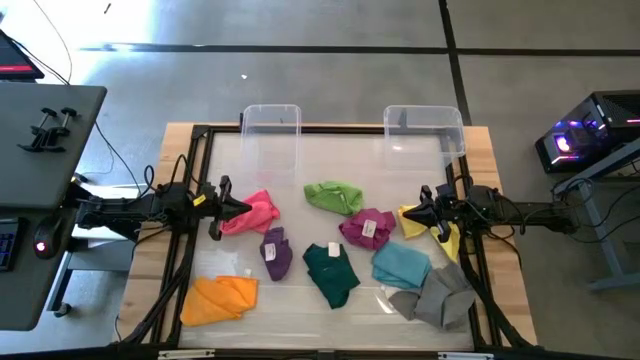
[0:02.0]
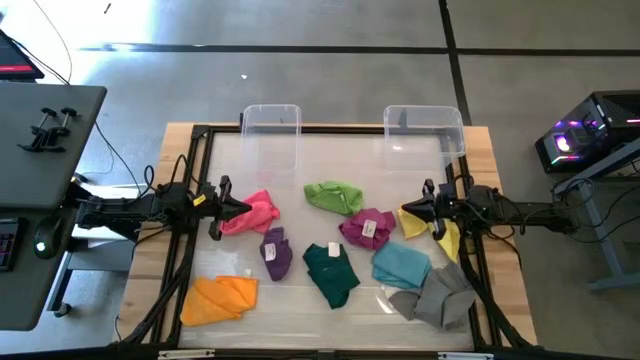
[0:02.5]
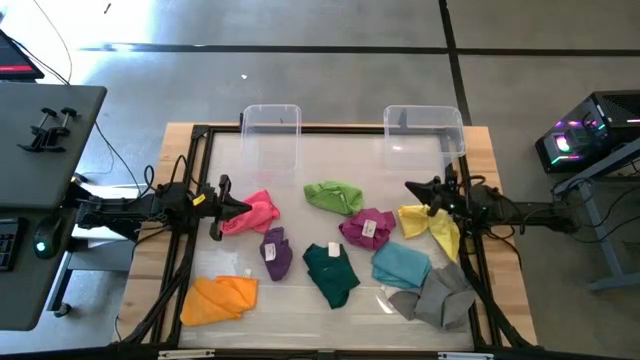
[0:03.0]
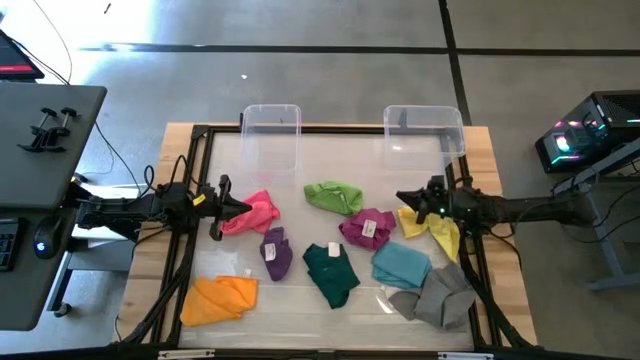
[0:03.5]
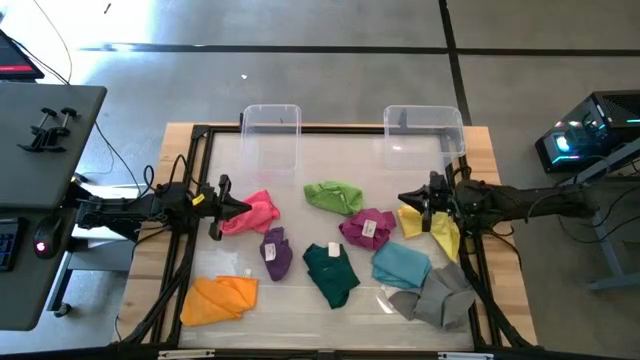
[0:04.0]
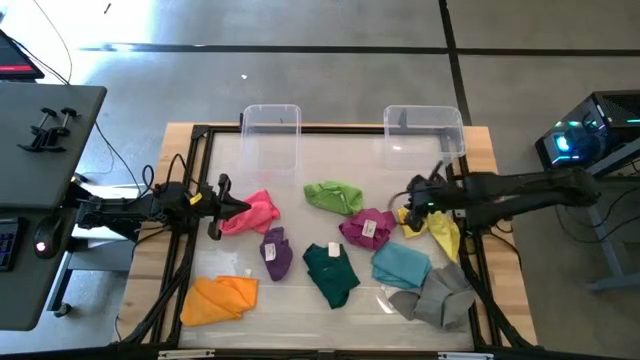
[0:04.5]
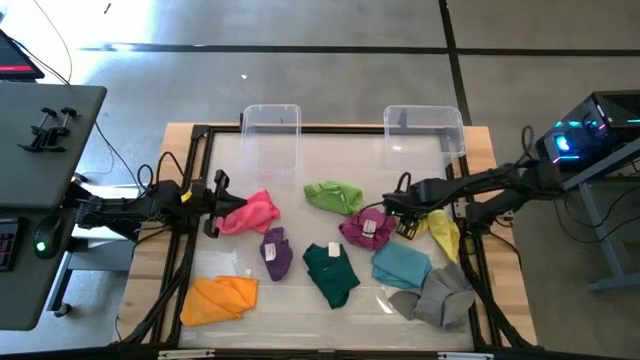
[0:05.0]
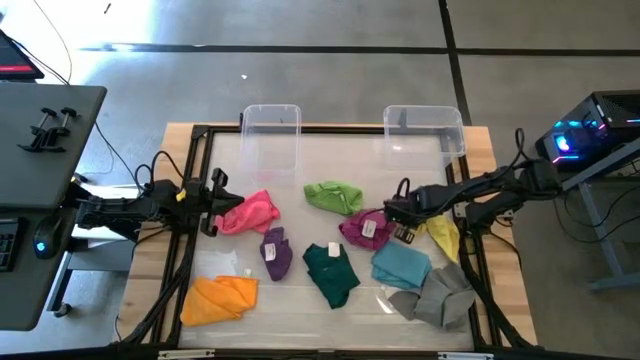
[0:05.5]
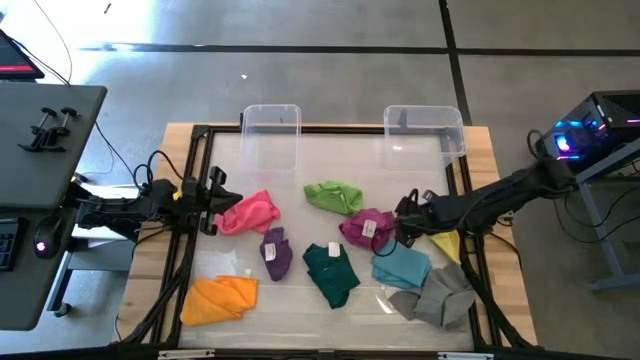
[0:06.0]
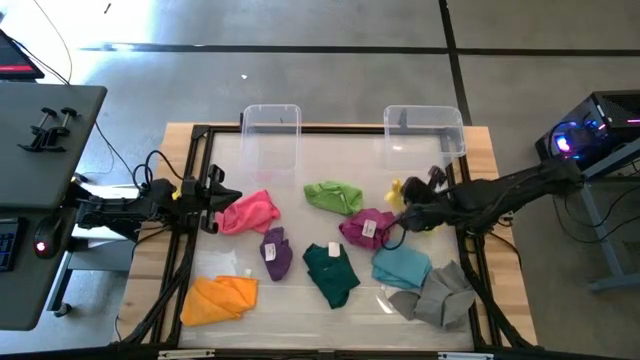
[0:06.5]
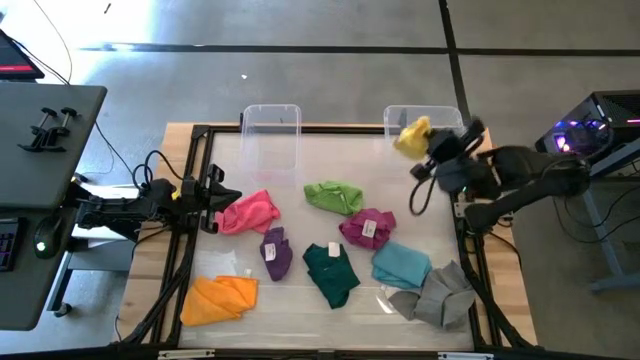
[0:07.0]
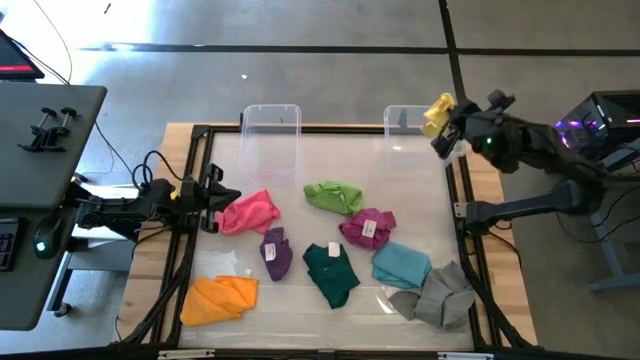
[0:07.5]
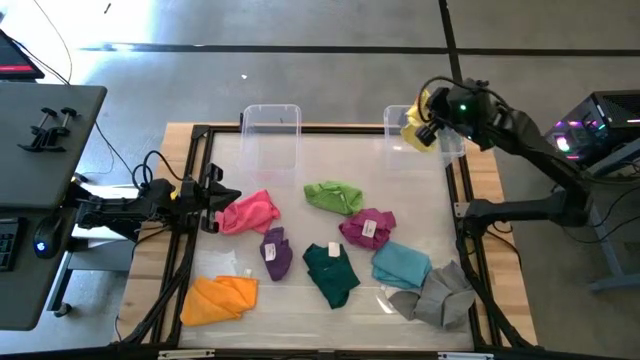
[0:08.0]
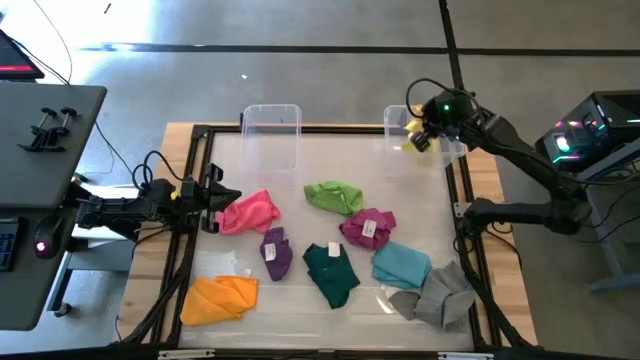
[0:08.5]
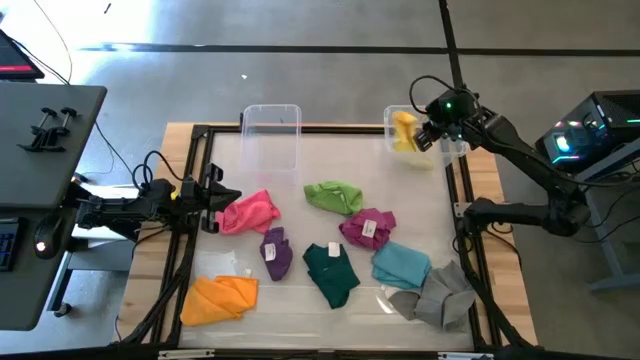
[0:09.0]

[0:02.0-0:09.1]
Task: Sort towels by color in basket
Put the yellow towel into the right transparent bin

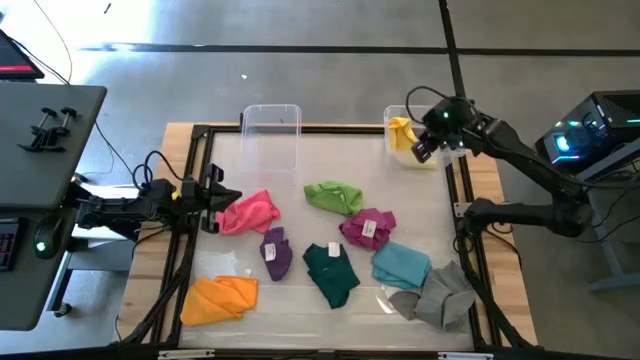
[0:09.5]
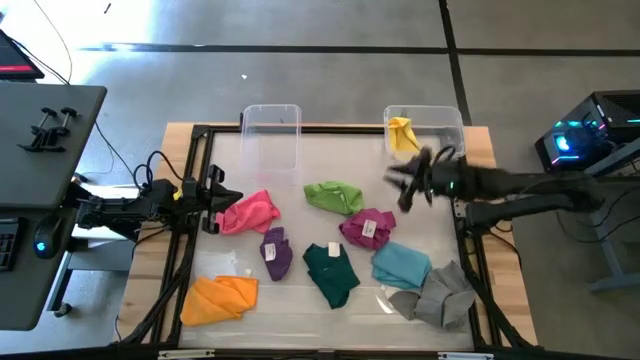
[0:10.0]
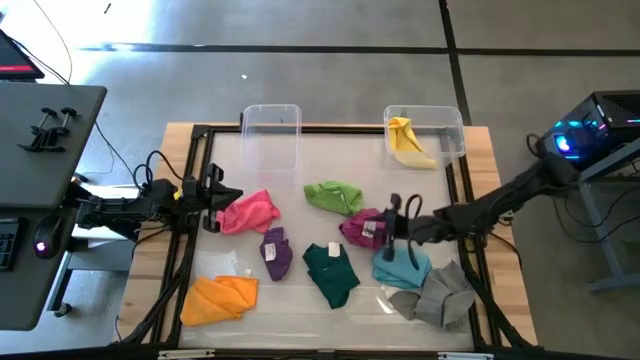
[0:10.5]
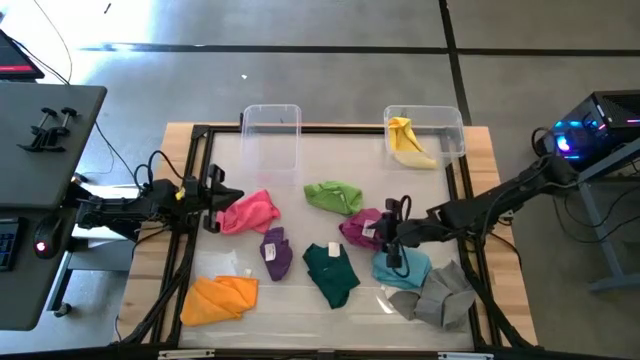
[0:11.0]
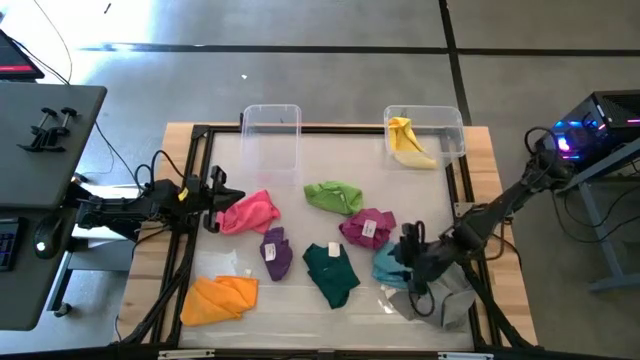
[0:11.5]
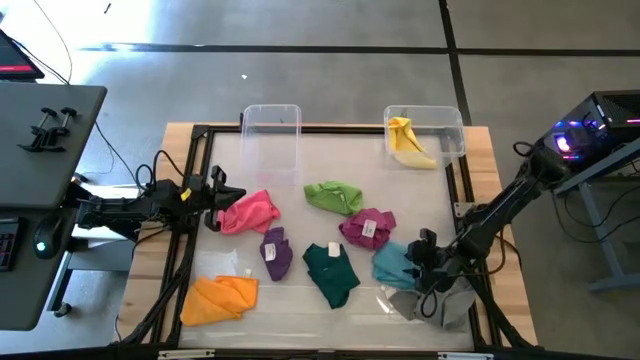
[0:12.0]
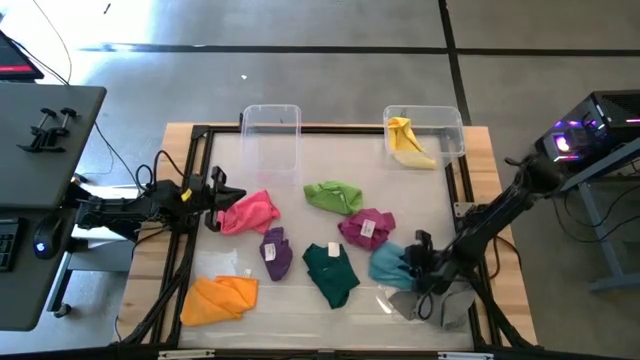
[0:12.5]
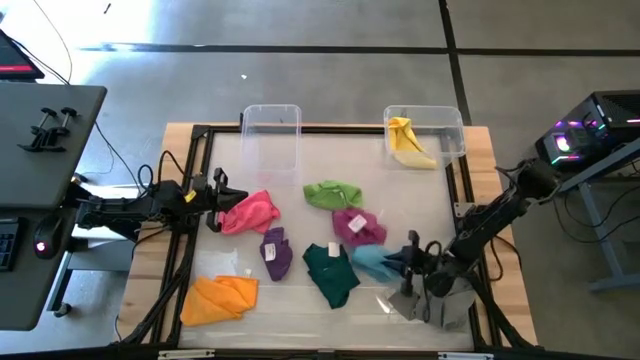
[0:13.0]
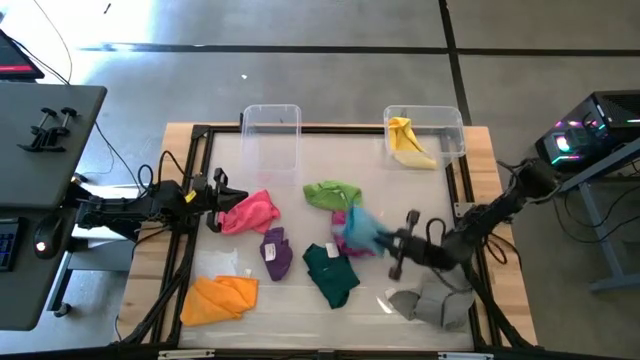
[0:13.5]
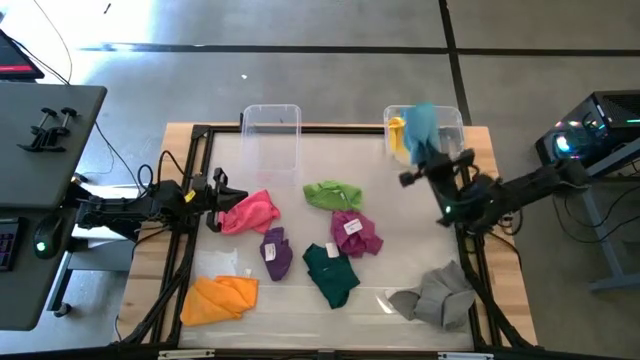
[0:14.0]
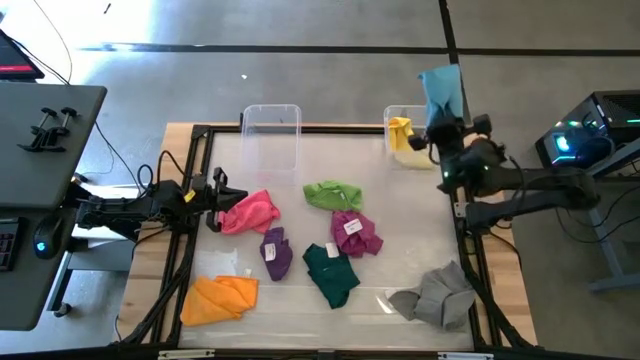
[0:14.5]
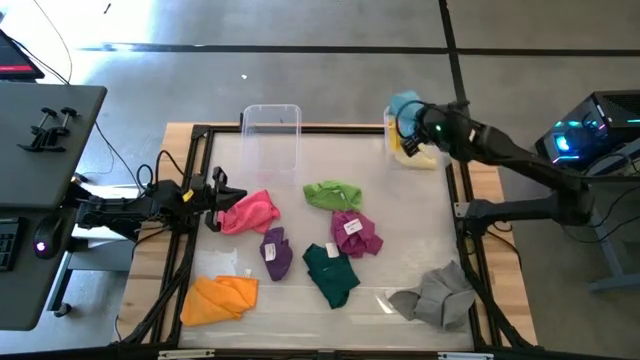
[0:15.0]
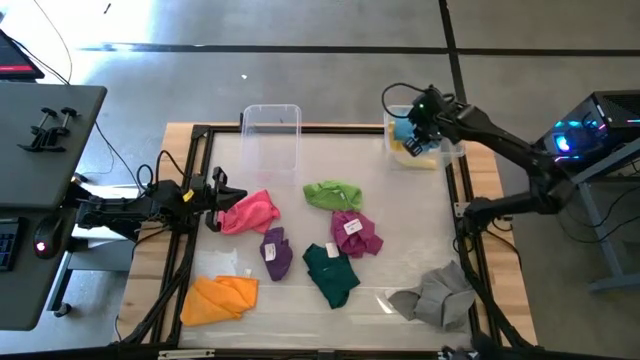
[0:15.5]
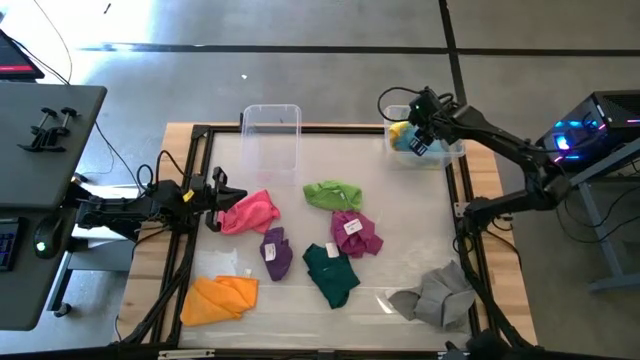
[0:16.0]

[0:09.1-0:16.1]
Put the blue towel into the right transparent bin

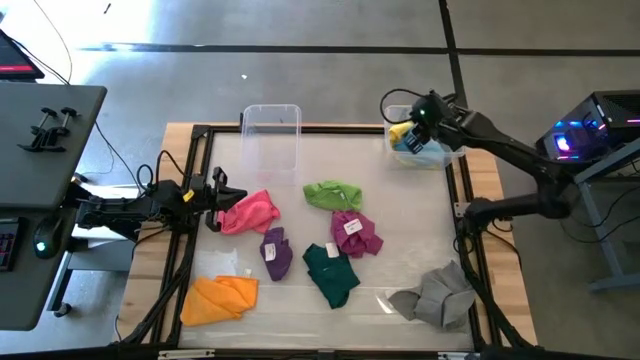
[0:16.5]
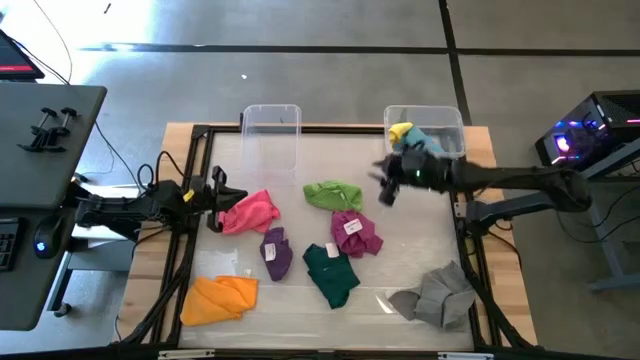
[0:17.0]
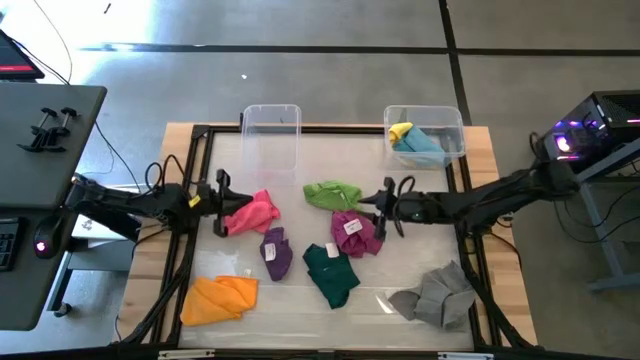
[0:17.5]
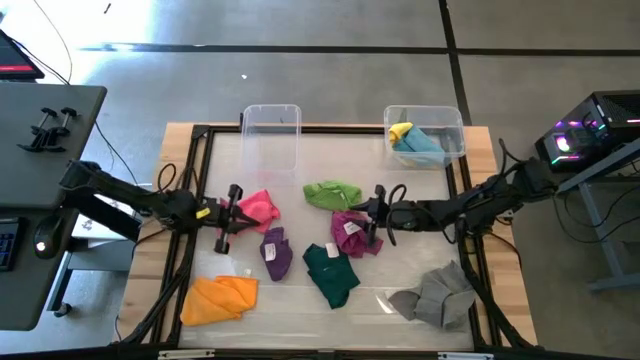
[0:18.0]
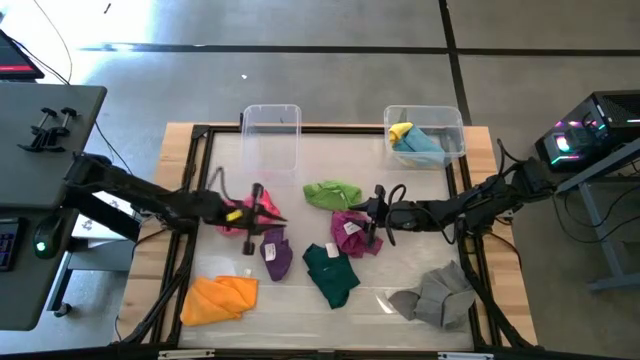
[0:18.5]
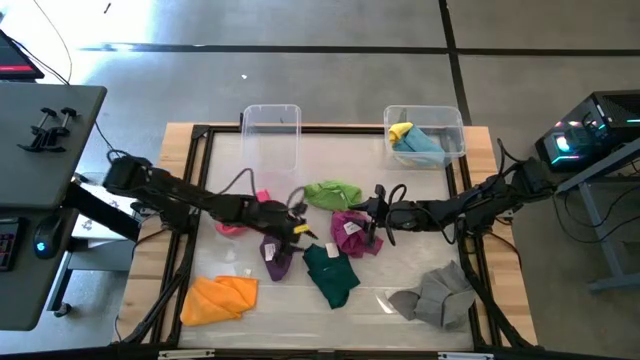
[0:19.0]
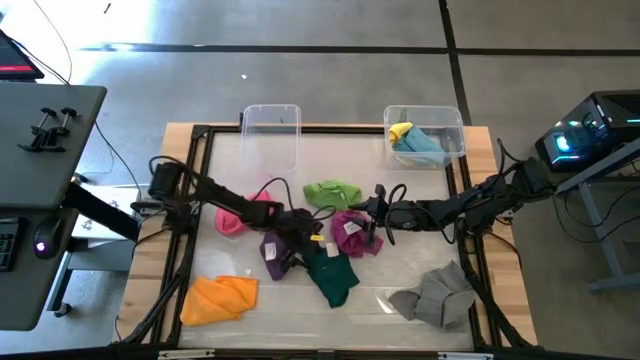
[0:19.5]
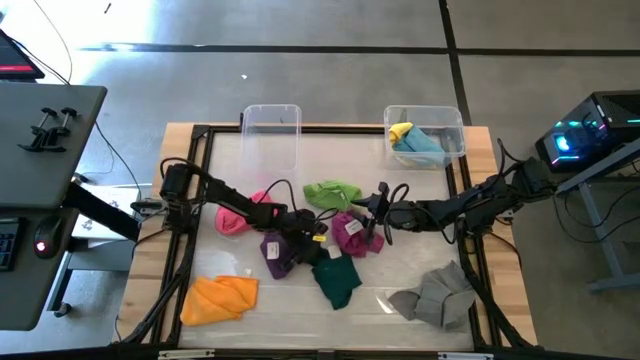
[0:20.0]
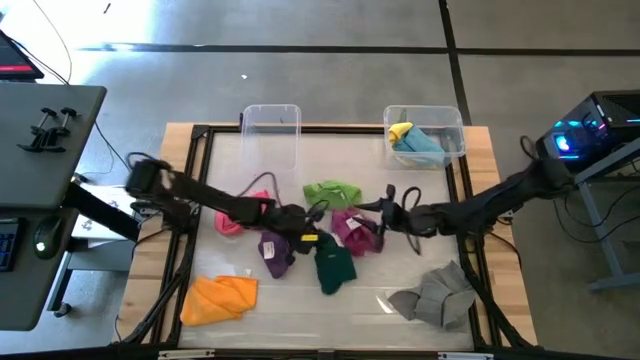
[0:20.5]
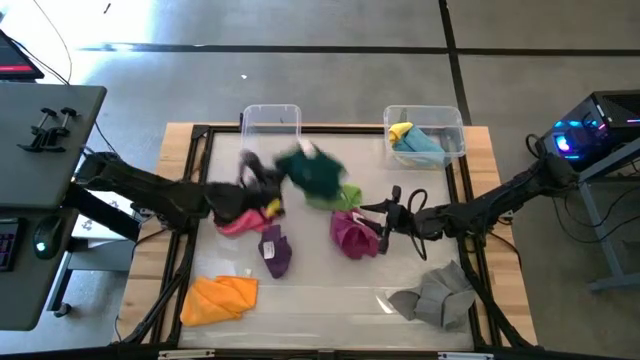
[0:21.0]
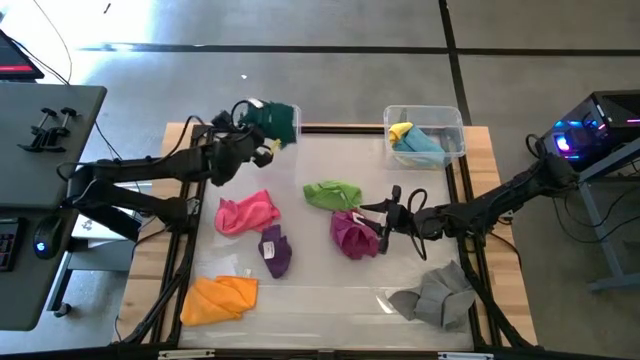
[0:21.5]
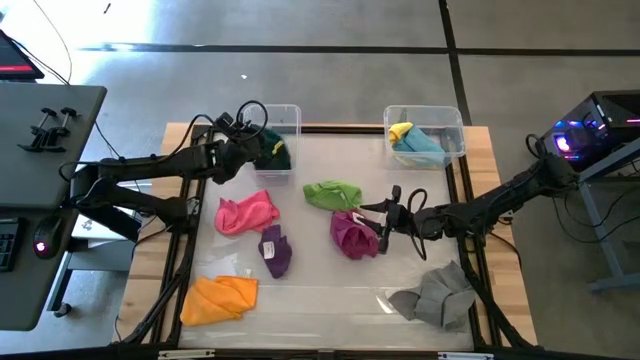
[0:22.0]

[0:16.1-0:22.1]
Put the dark green towel into the left transparent bin
